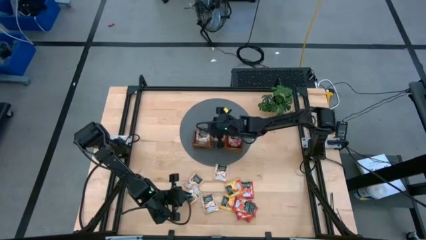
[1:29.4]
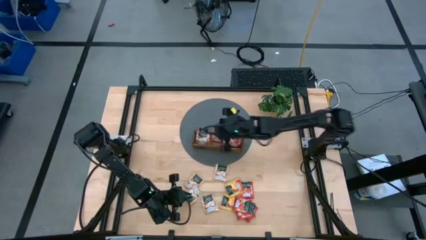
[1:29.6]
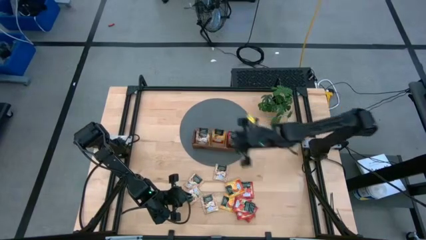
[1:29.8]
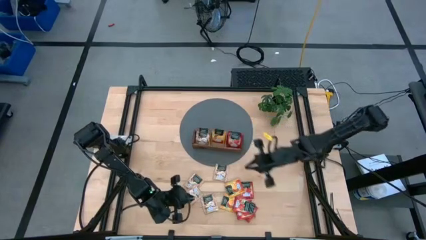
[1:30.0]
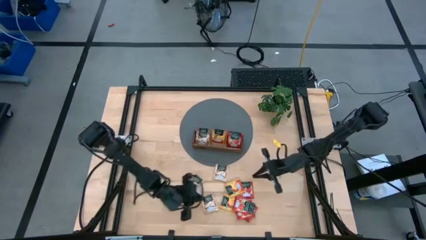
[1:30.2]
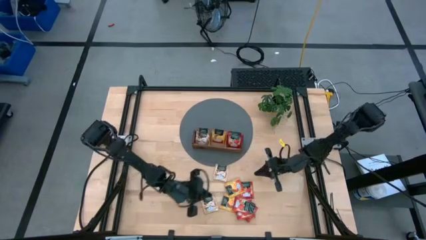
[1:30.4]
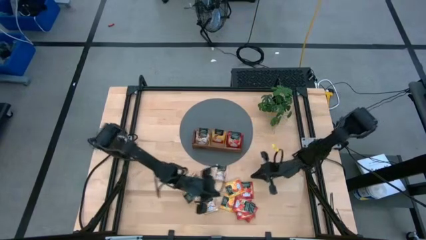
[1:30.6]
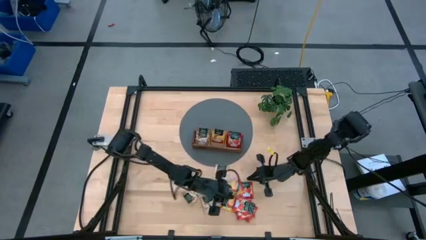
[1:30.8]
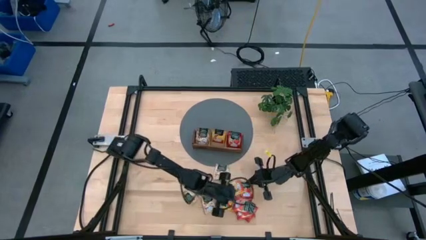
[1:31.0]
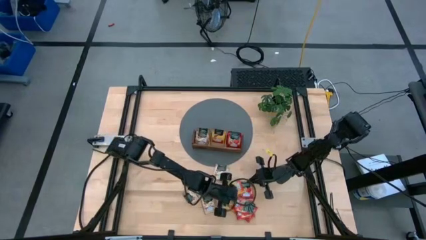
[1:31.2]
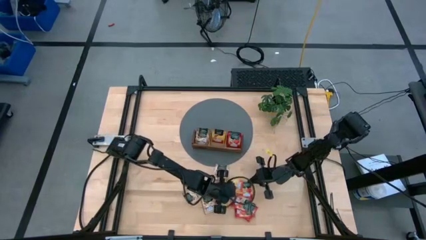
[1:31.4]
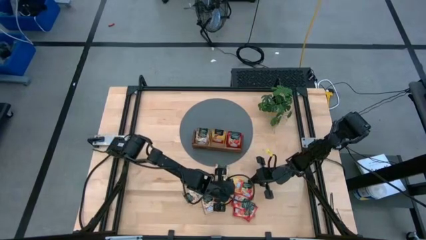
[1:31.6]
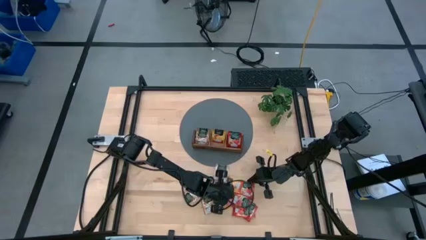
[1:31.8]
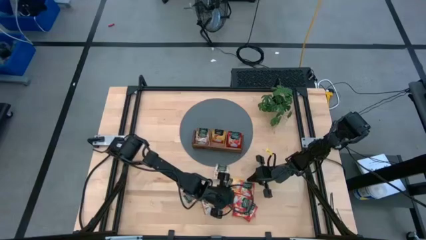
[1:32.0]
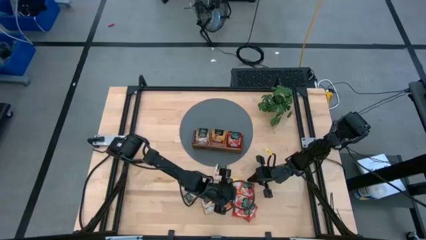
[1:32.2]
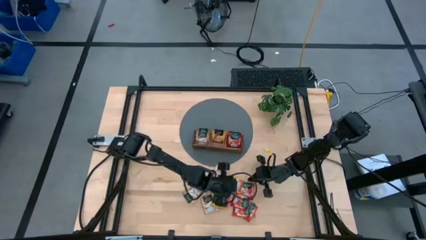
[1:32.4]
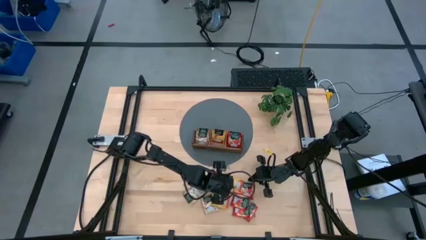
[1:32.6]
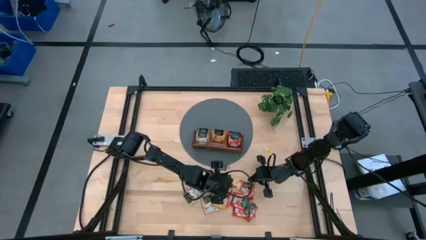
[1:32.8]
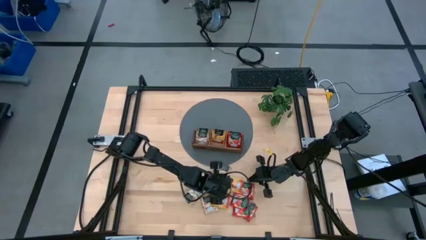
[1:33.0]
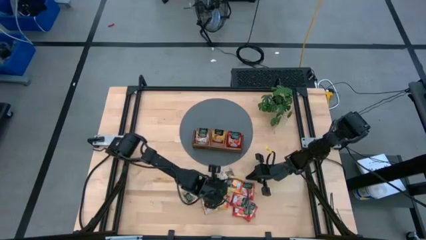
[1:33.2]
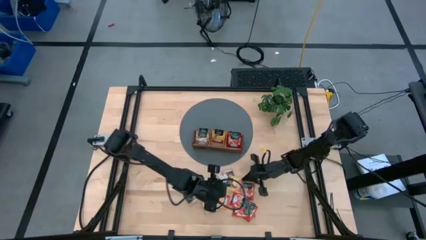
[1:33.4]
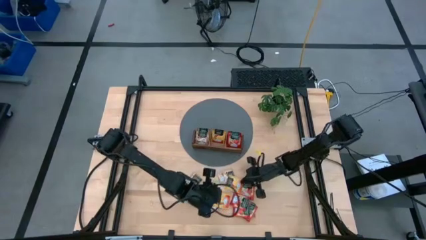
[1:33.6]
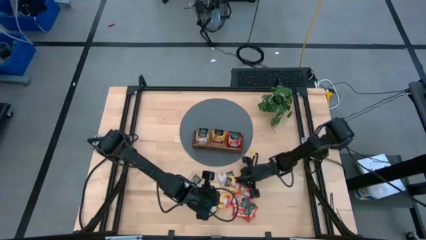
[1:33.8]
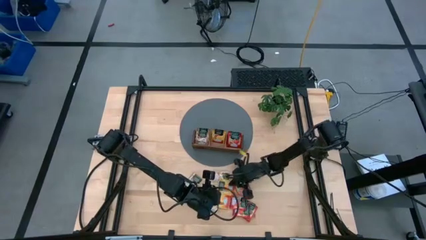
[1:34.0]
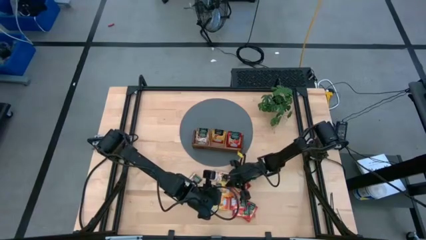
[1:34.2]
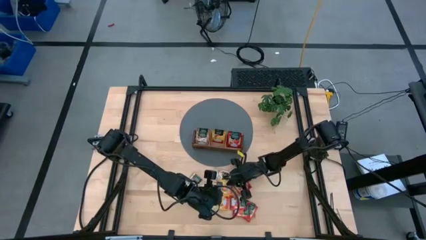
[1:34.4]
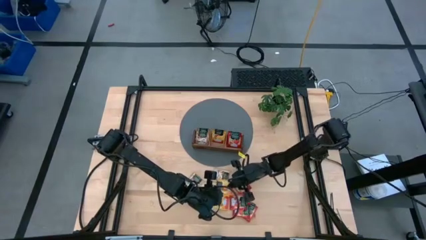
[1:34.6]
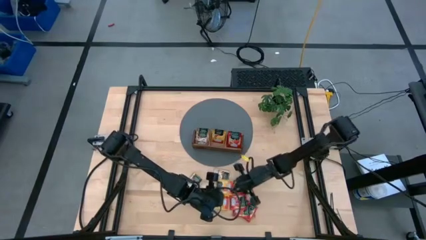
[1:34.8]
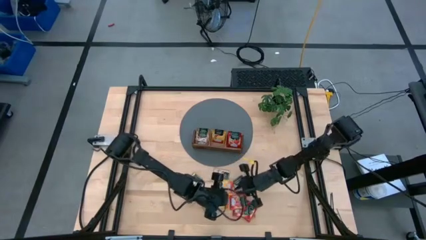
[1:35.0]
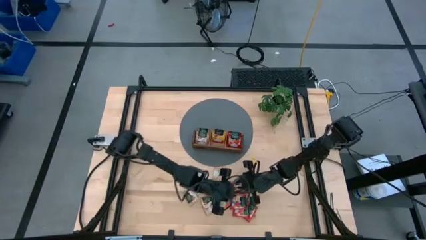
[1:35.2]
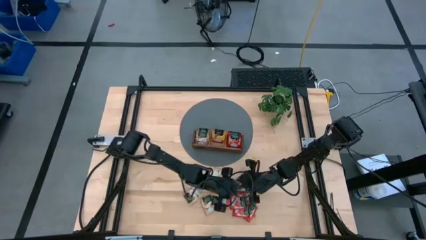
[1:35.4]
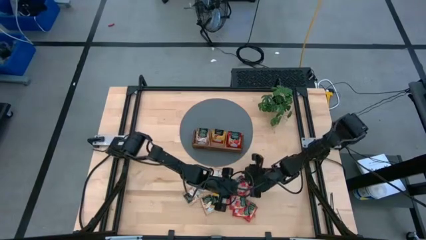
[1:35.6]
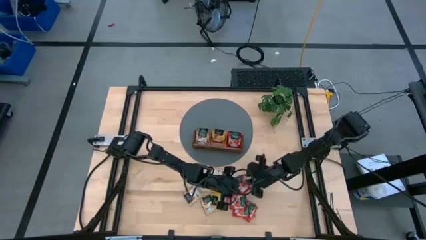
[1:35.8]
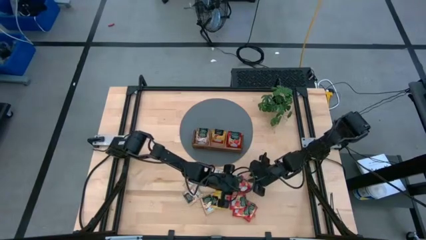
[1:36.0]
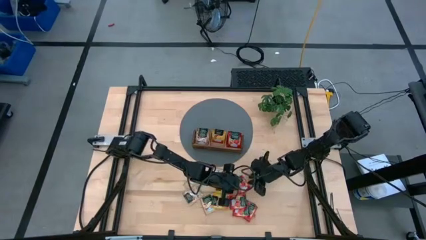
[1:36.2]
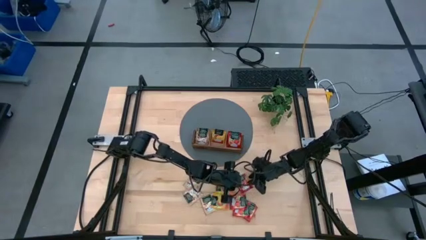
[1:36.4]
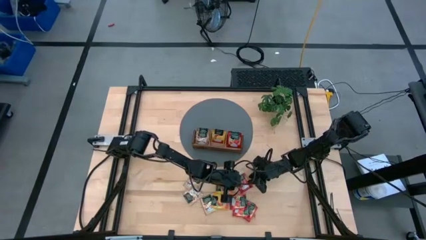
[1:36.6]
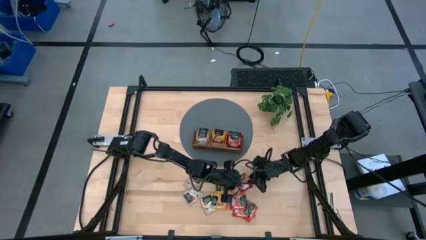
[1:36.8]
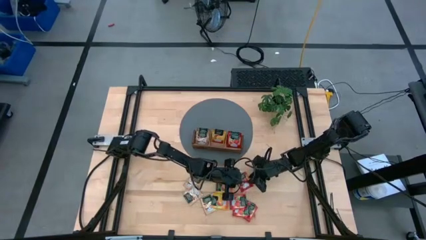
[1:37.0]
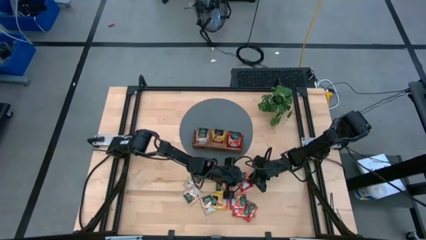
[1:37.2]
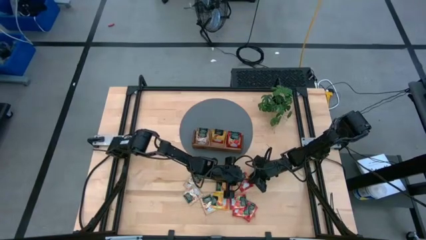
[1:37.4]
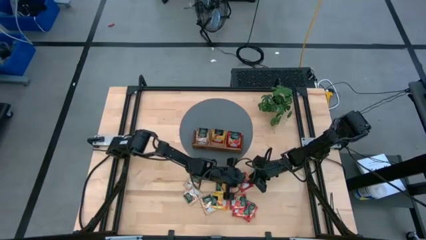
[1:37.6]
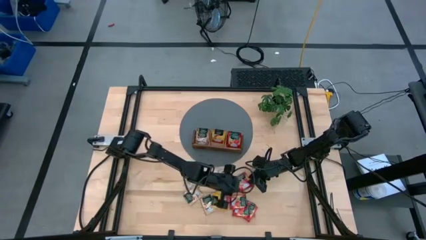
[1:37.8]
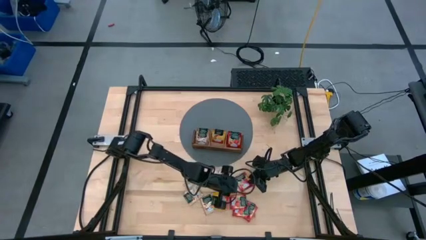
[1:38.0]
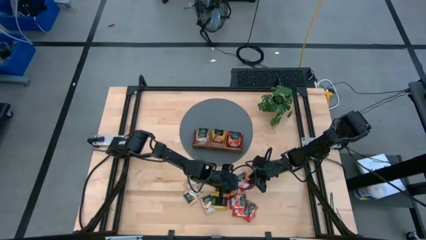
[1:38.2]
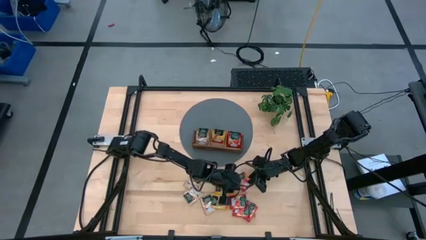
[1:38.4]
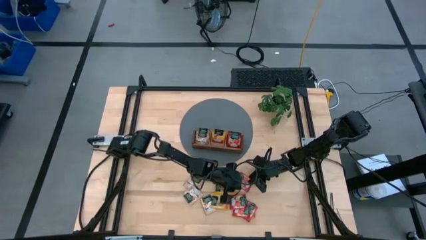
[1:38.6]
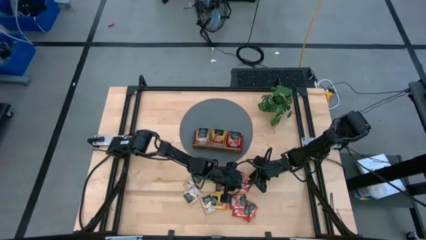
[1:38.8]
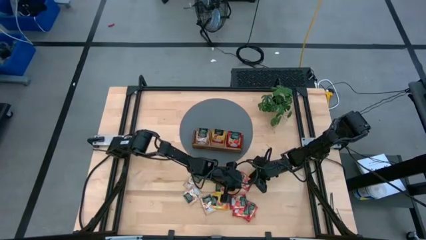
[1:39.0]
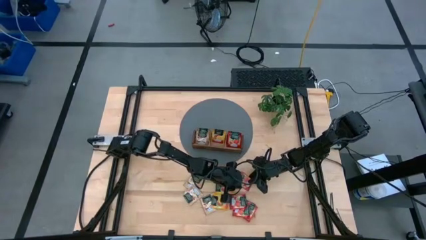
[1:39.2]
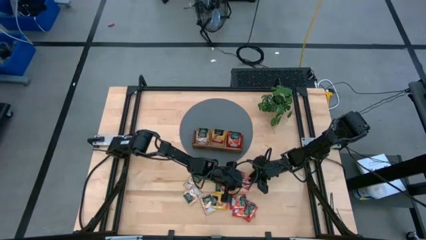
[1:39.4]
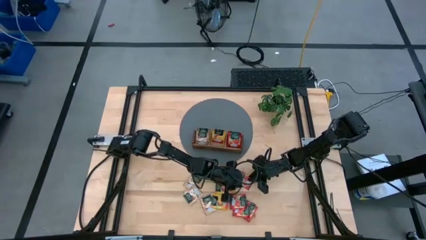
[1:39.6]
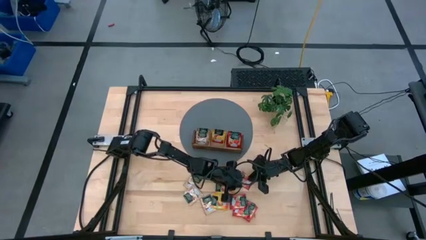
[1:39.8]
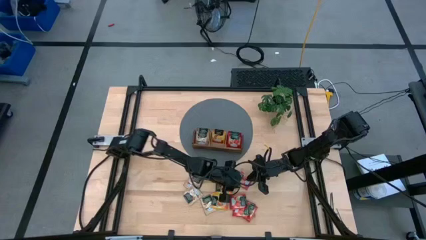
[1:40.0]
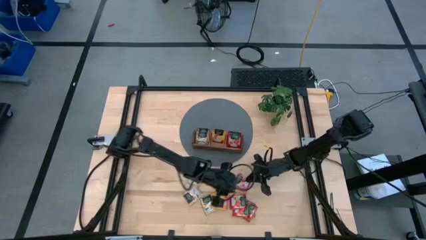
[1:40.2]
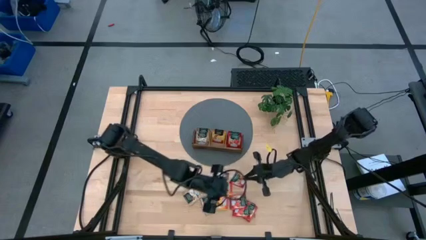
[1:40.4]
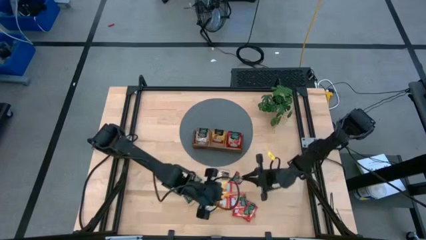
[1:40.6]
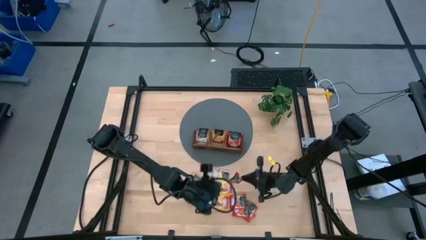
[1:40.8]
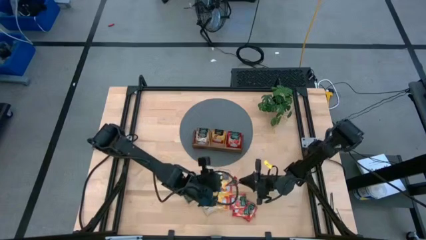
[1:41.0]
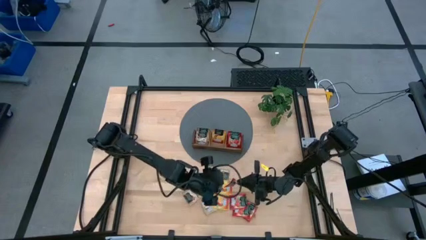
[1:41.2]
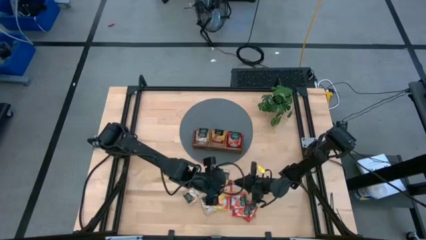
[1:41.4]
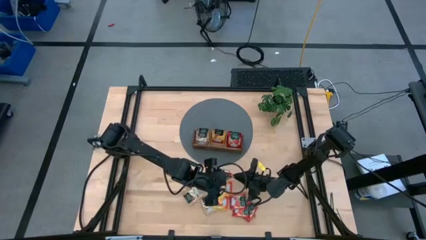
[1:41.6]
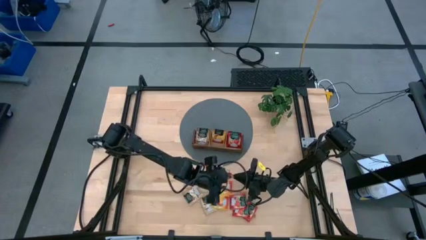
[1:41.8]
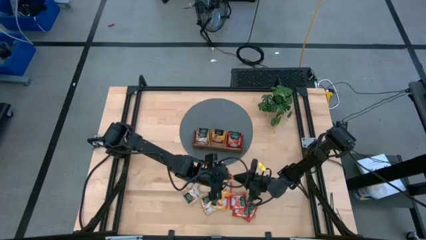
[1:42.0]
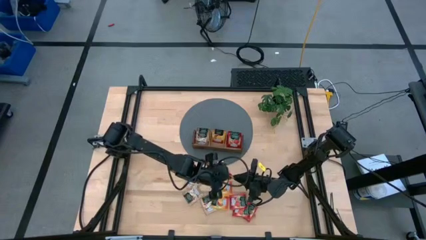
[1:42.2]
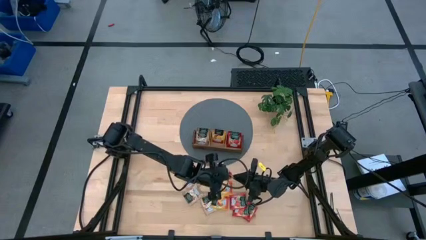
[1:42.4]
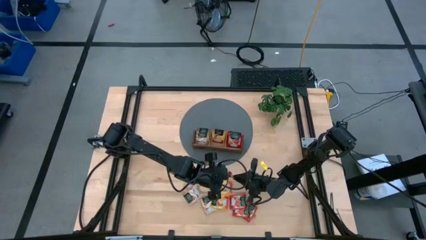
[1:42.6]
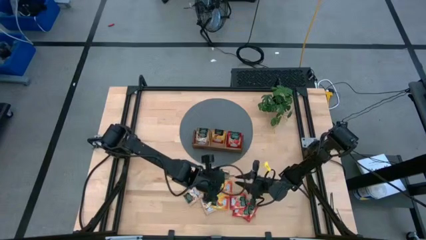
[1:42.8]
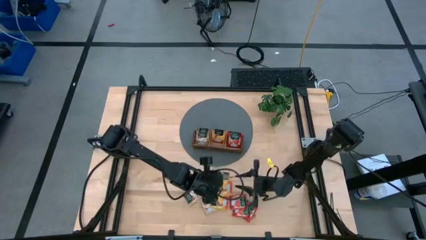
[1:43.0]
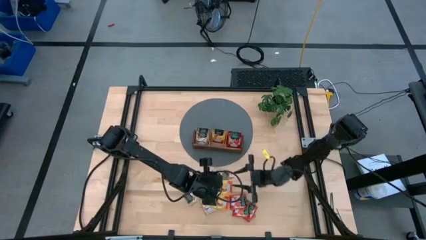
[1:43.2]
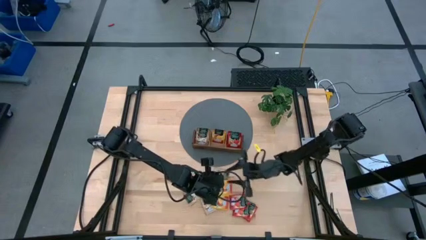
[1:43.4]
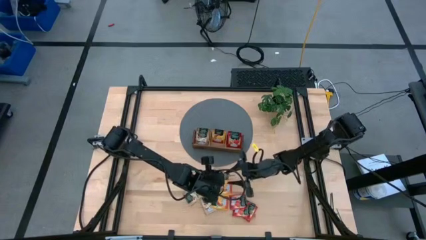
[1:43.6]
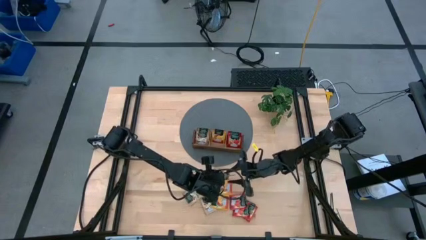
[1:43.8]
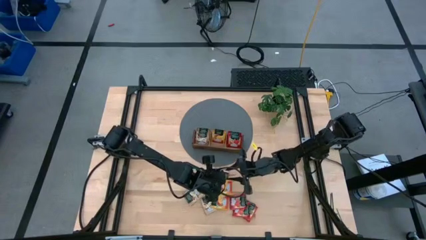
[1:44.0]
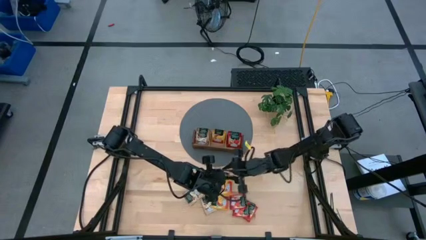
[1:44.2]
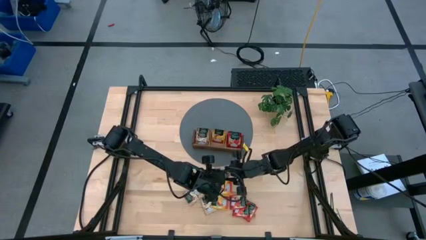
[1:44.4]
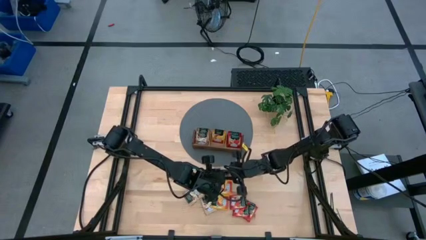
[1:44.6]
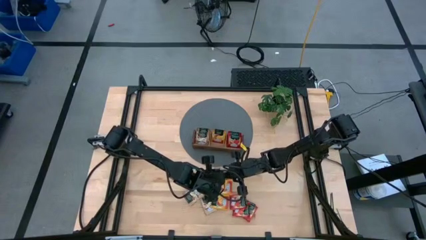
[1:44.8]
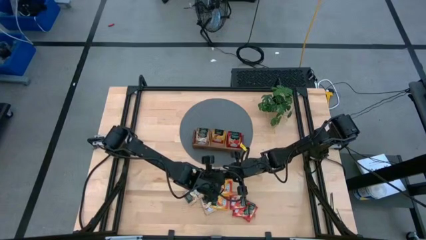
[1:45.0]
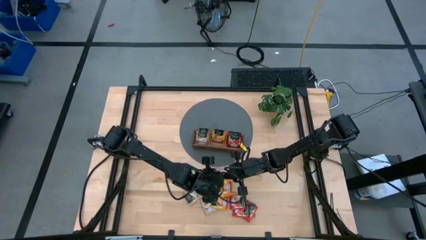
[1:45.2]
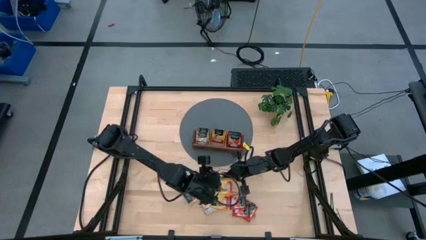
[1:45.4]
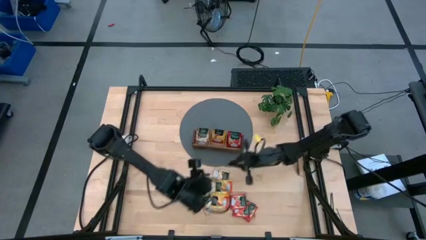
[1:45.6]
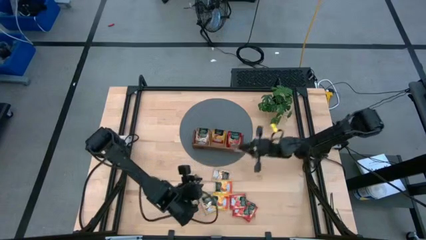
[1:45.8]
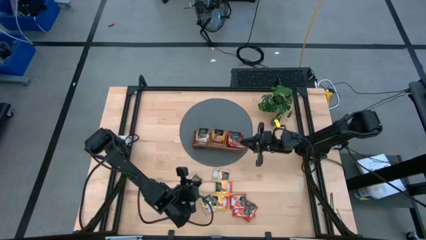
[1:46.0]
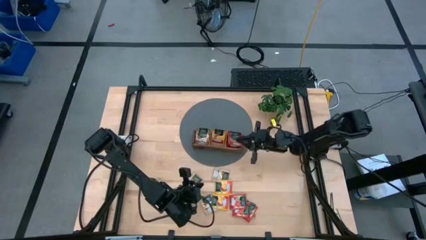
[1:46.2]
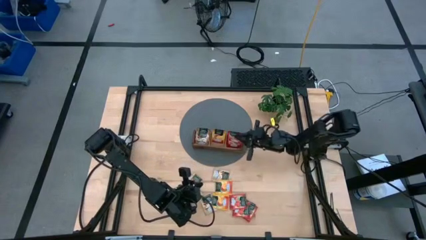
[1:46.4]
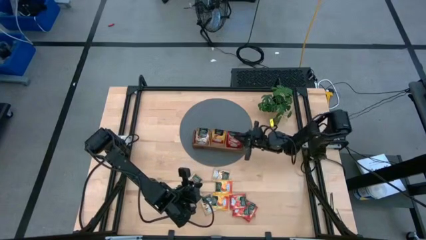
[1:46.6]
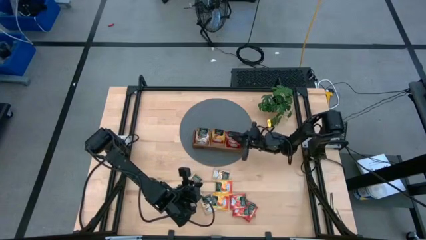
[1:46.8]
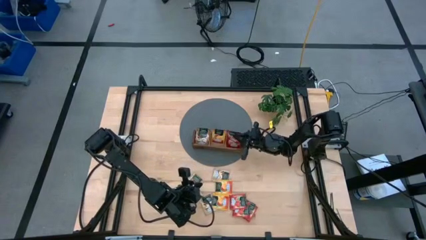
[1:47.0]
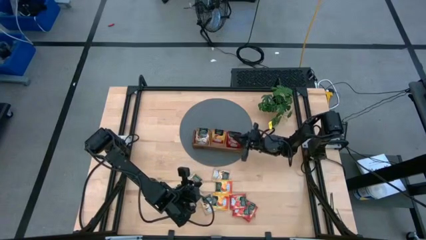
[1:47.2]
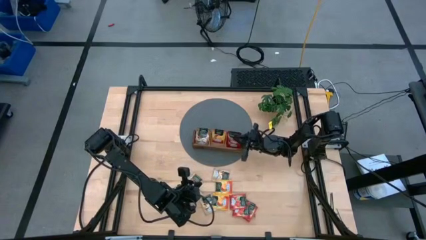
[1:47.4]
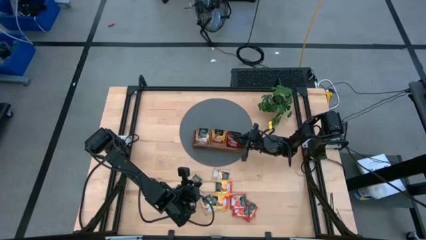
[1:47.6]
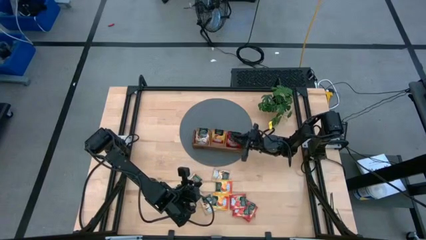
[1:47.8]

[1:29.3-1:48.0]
Task: Pick & Place Tea
Put the red tea bag into the right section of the wooden organizer
